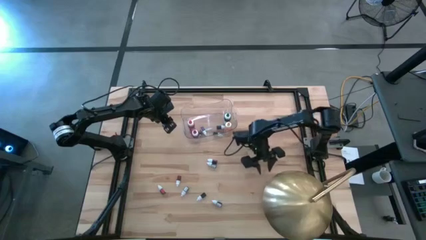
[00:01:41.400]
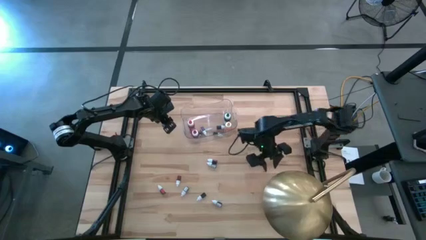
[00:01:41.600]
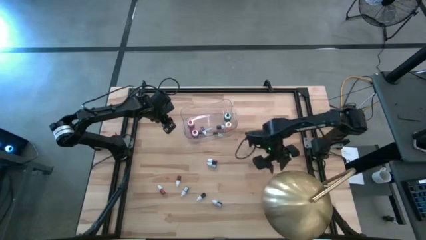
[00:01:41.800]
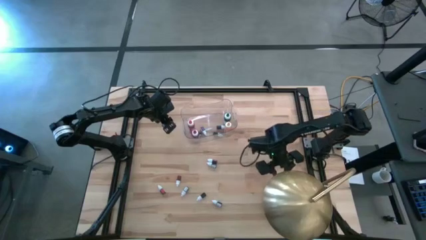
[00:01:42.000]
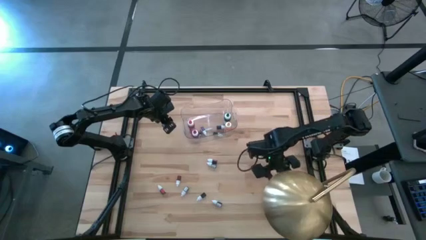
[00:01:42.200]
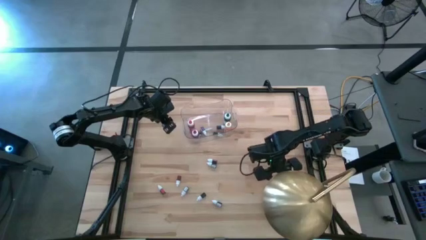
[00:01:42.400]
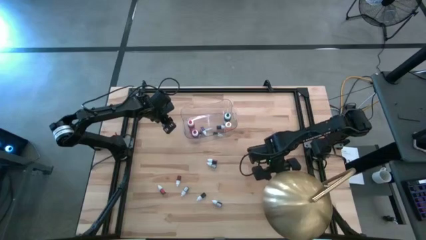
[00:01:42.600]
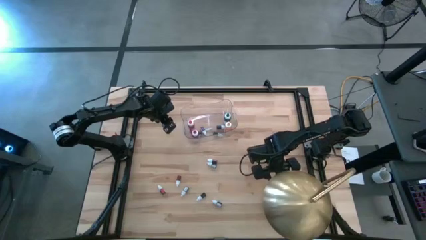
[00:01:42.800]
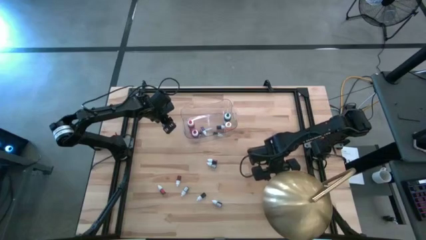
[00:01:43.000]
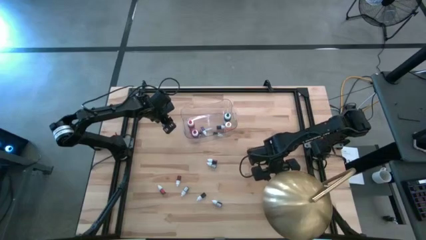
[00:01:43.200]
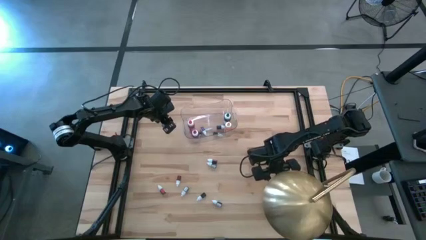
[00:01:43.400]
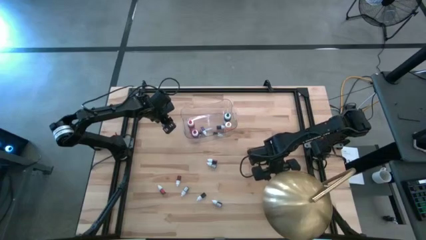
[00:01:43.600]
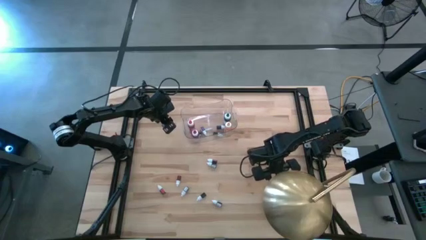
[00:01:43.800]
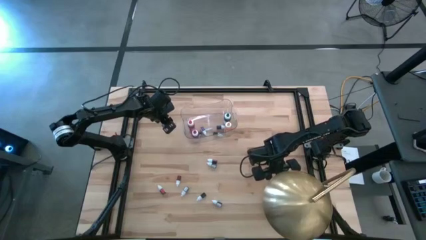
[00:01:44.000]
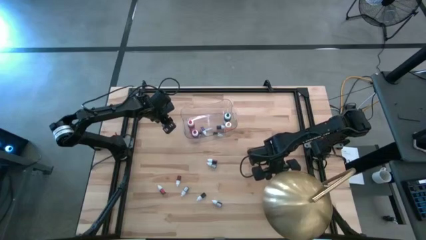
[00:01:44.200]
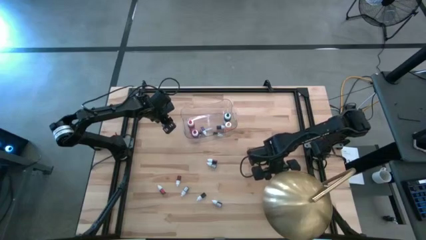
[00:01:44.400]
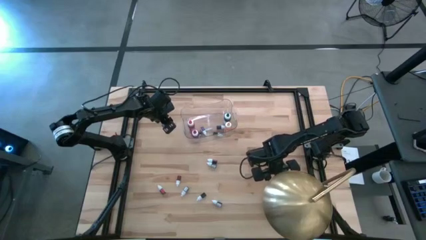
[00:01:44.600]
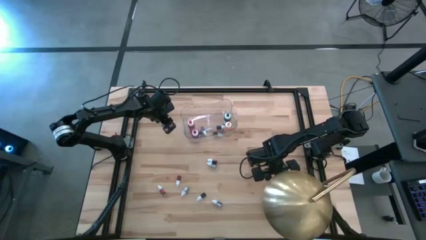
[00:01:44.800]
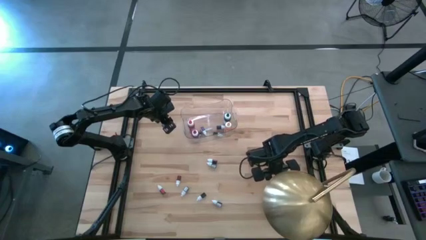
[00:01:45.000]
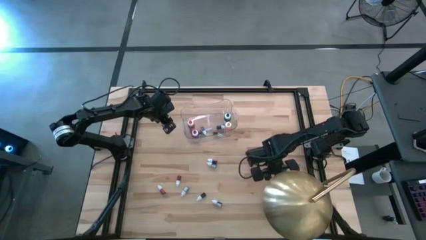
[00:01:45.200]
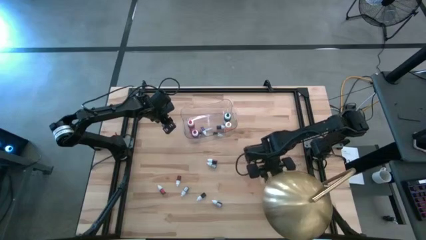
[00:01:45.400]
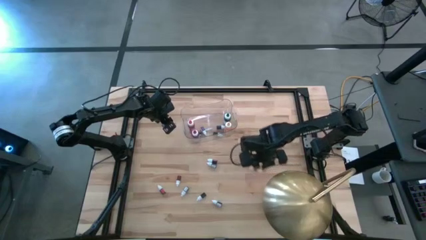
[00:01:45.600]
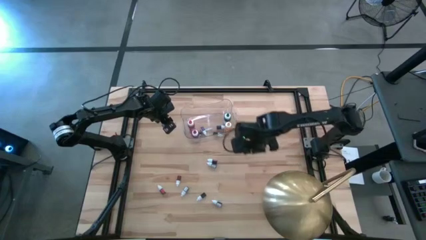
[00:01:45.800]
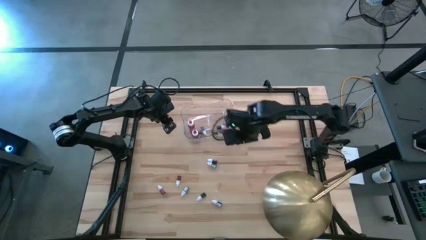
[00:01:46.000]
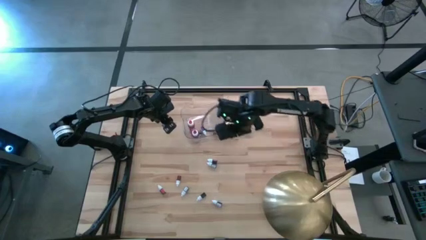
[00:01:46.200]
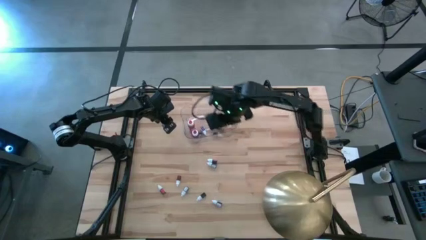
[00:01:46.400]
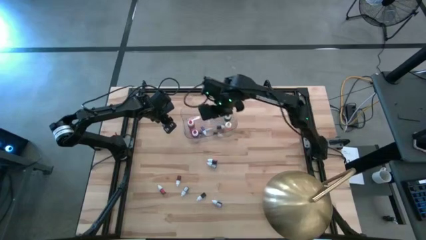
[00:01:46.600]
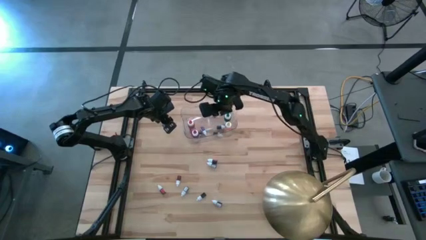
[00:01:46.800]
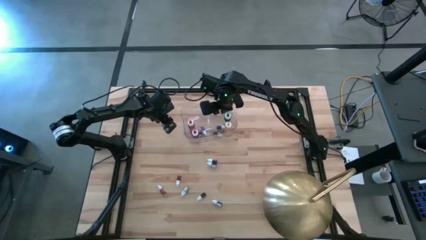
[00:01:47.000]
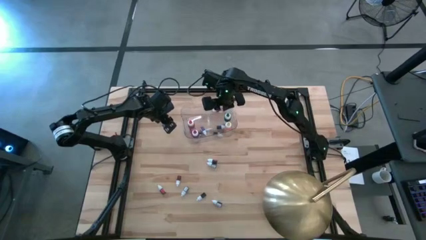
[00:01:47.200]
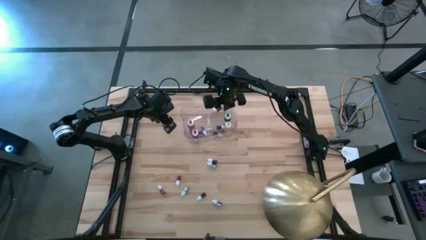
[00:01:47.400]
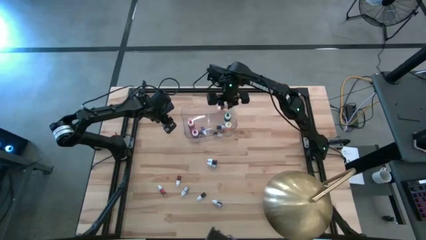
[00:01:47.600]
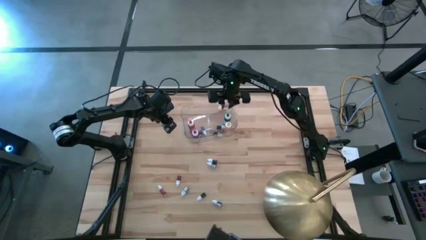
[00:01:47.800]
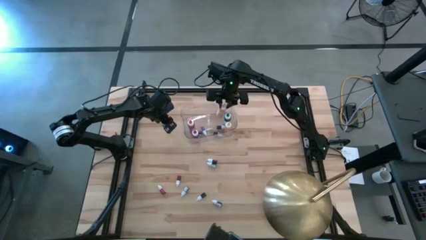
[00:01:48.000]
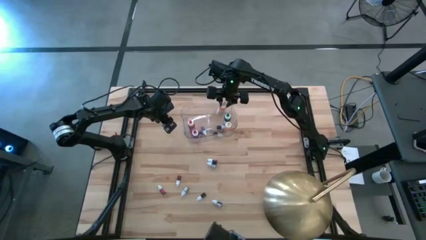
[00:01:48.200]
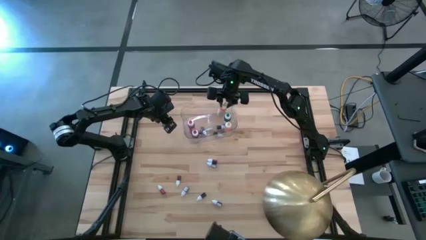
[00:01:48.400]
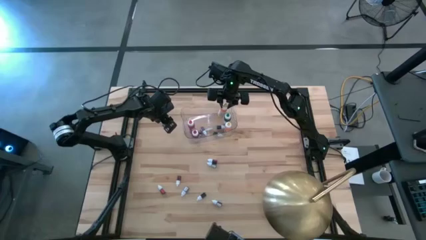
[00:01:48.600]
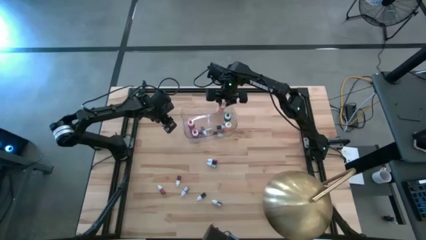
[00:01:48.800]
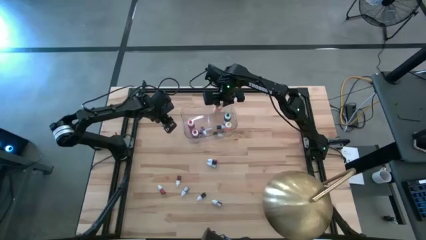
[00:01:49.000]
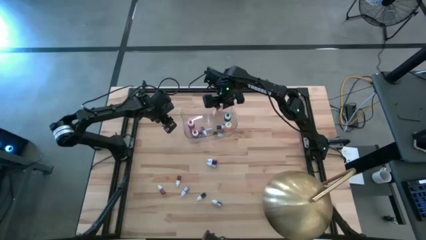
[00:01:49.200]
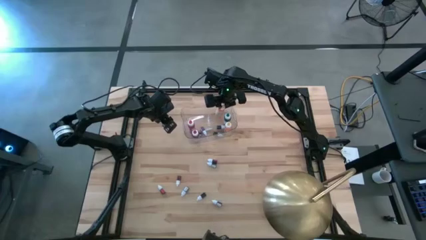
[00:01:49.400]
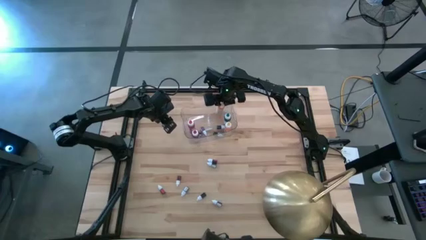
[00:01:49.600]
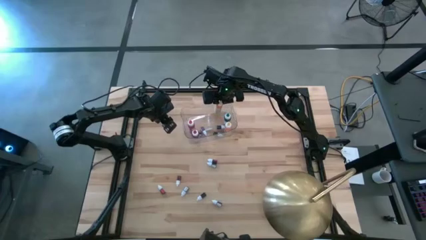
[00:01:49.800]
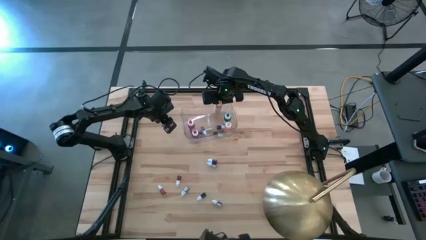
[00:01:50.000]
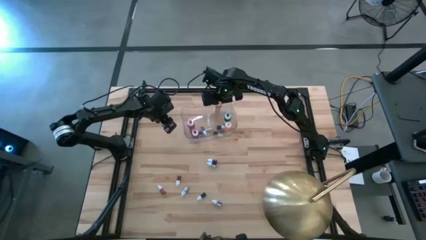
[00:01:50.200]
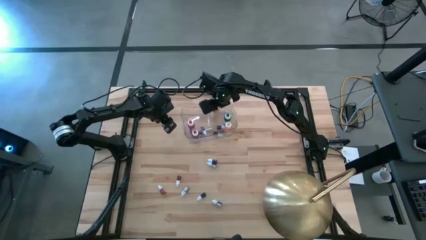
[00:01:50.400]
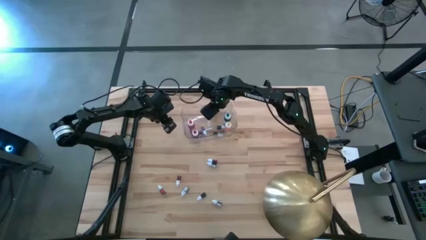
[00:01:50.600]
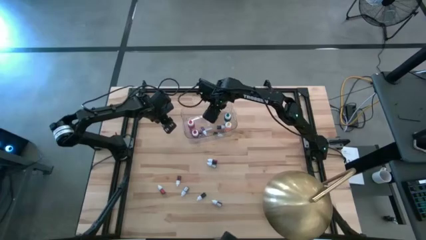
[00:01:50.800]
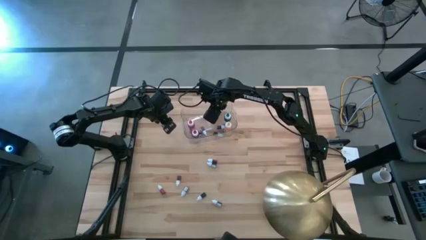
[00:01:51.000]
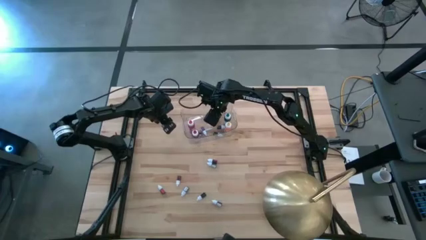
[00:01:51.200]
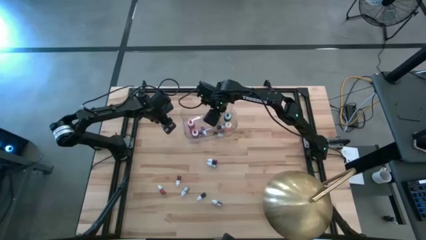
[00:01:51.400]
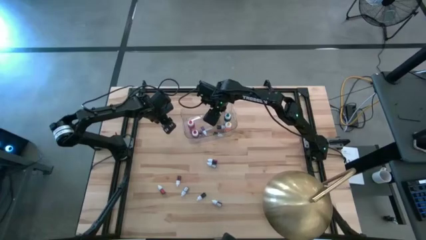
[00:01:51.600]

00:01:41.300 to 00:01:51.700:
Task: Pick & Place food coloring
Put the large yellow food coloring bottle in the transparent bin

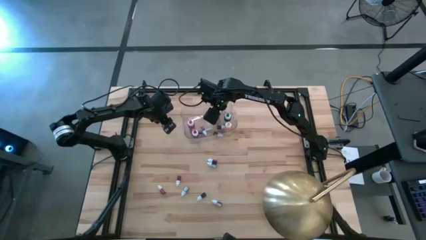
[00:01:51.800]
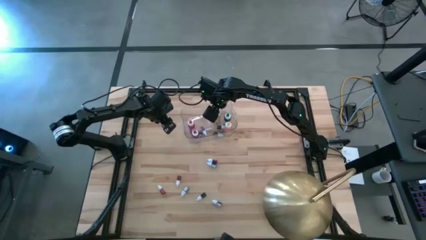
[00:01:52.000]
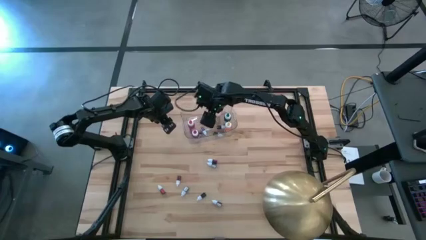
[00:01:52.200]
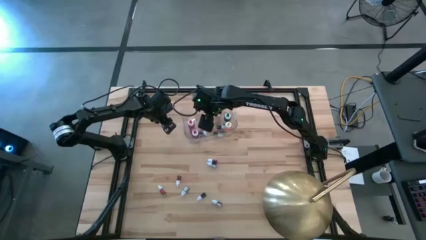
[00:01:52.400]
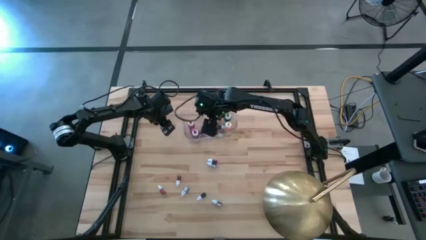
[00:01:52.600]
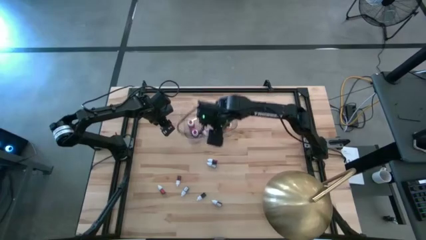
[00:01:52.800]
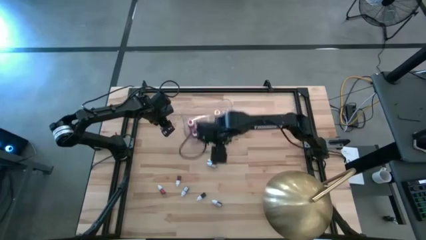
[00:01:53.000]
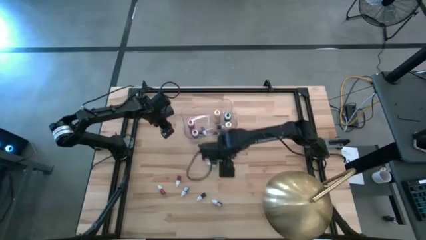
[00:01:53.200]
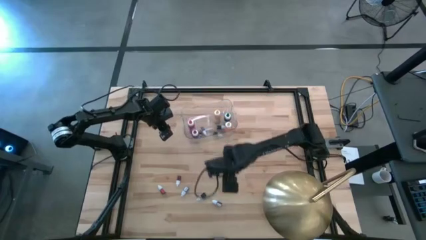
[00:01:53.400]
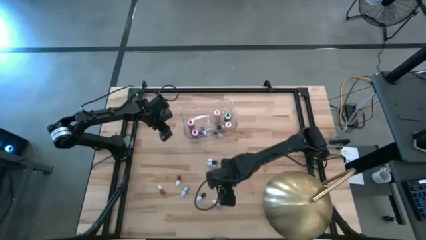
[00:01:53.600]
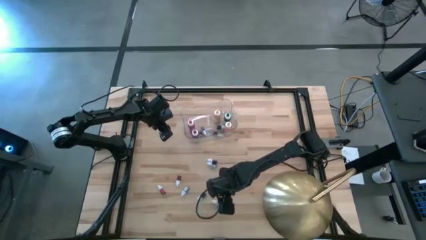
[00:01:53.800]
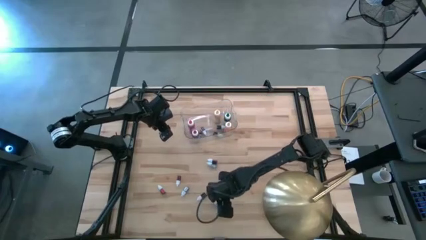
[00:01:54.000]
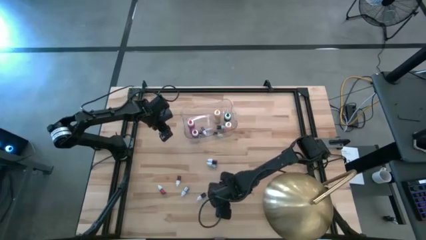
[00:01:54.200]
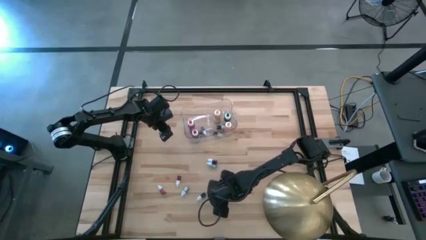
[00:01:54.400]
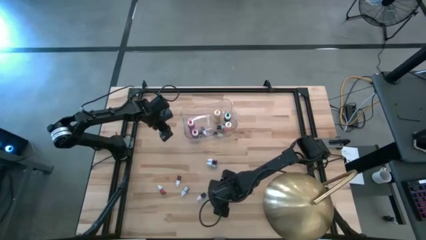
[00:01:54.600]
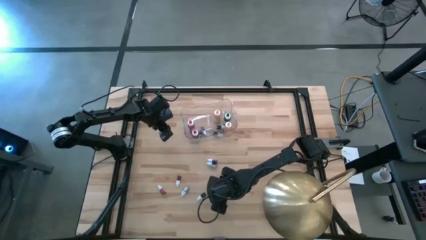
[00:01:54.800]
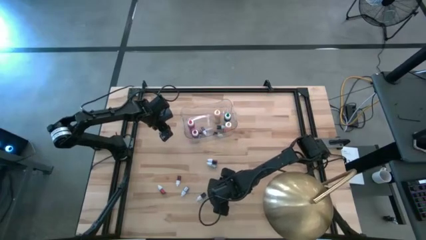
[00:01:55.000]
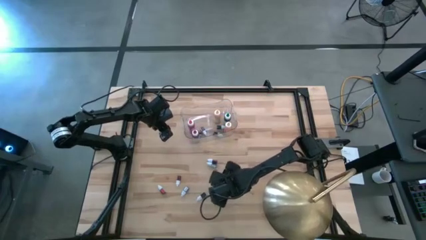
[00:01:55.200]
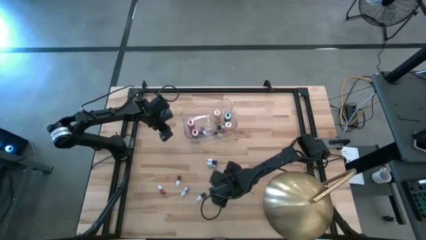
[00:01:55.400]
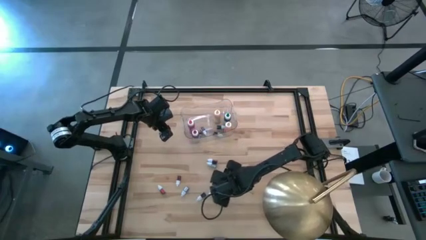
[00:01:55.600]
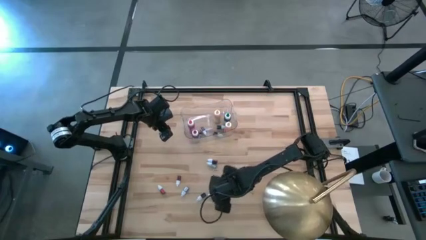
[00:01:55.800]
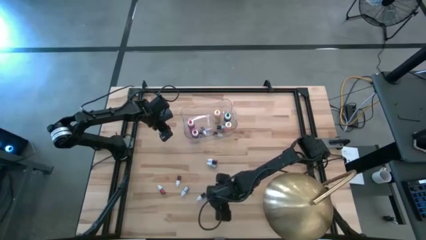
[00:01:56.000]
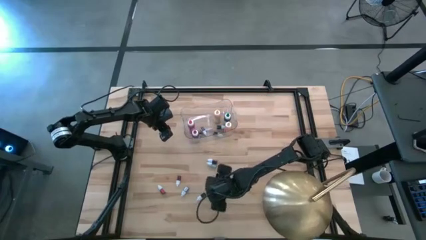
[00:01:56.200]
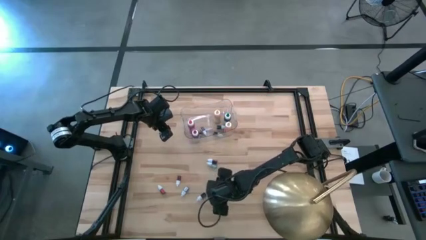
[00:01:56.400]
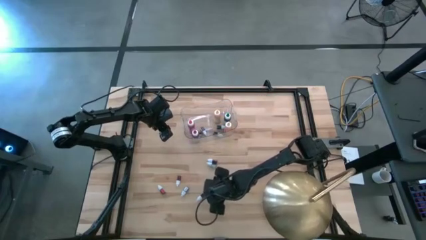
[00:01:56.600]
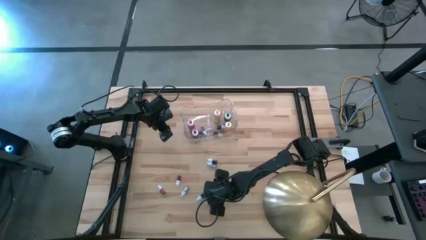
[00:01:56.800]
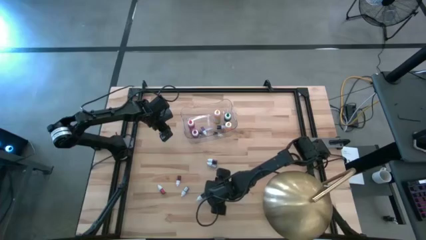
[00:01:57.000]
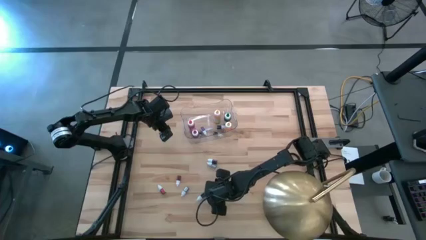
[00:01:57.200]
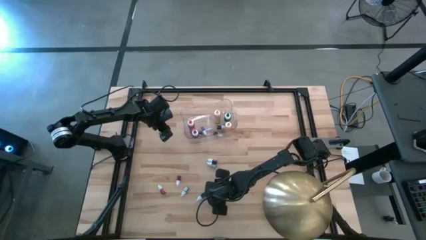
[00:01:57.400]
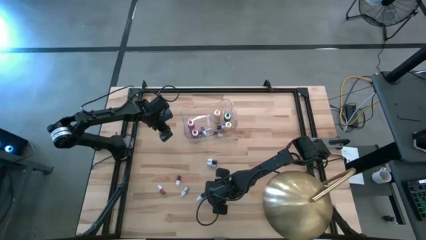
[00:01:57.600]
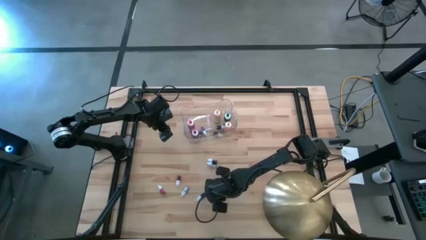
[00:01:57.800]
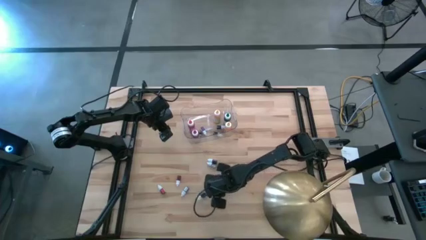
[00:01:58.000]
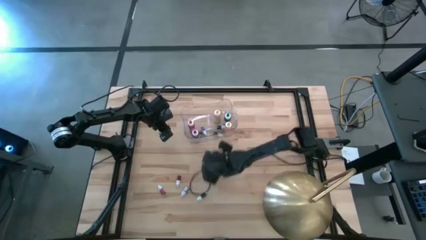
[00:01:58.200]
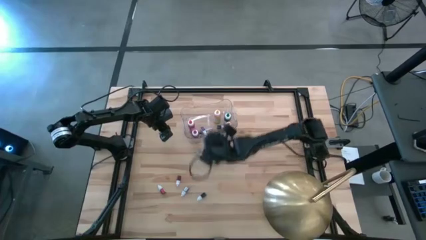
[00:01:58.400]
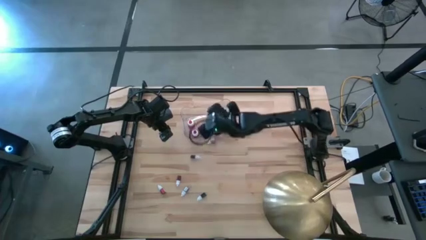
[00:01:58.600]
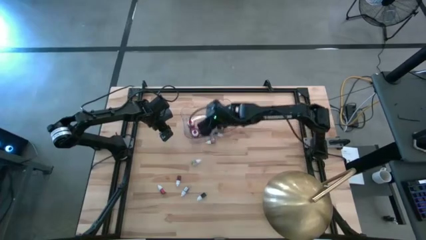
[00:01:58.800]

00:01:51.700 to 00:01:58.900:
Put the right small red food coloring bottle in the transparent bin
